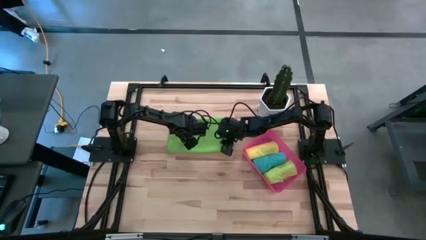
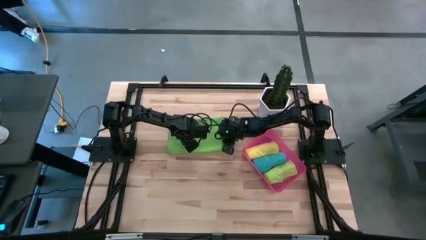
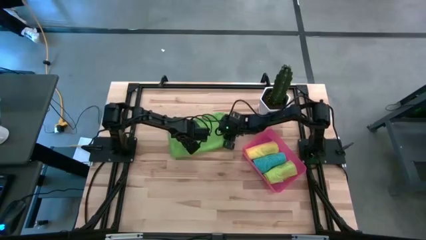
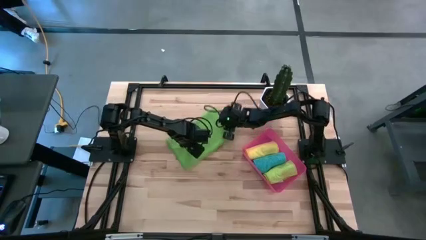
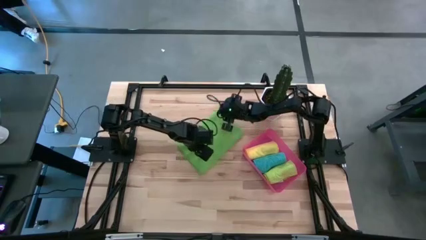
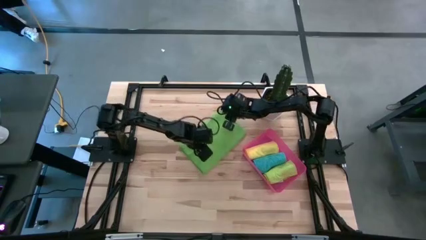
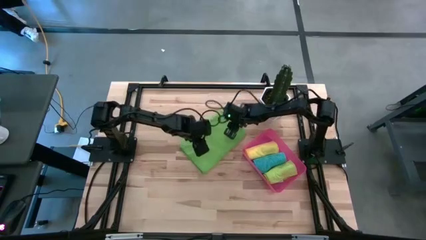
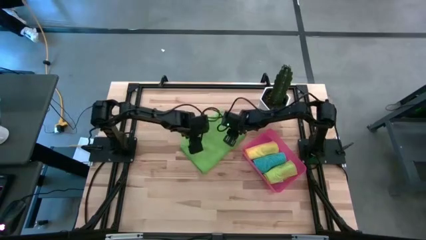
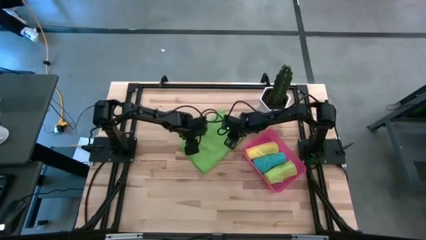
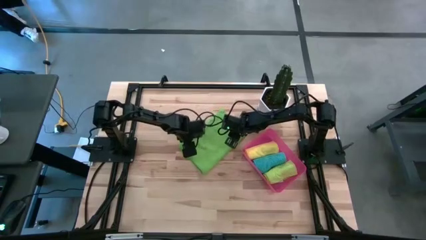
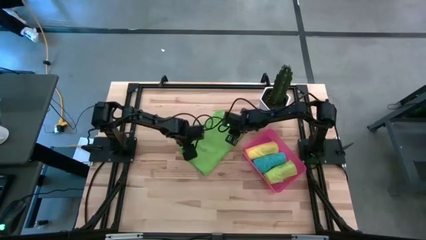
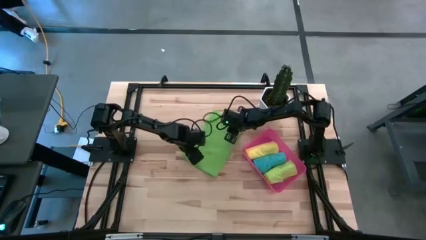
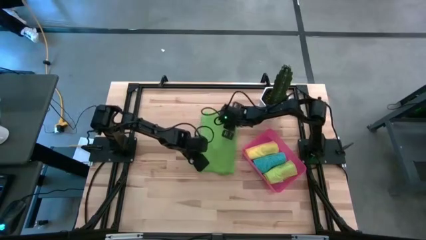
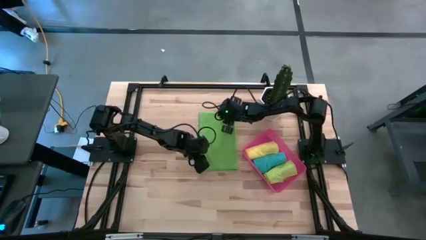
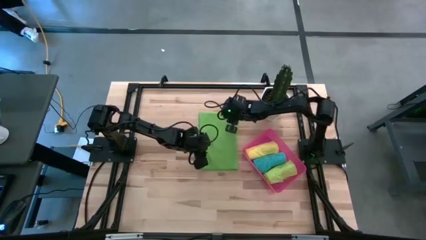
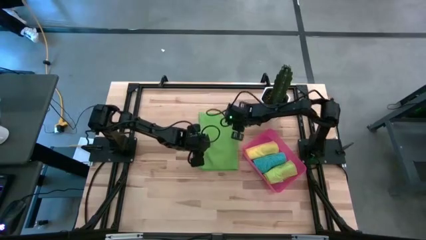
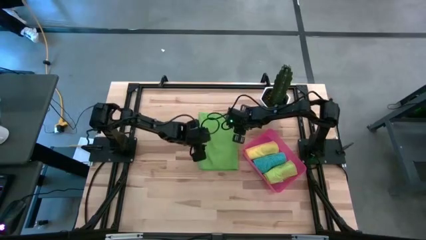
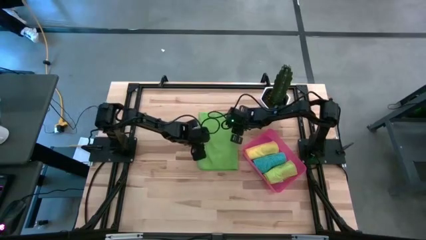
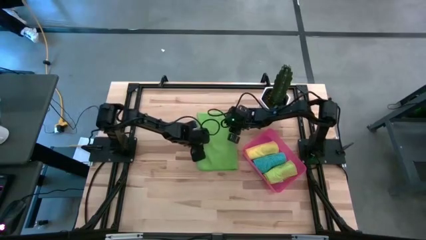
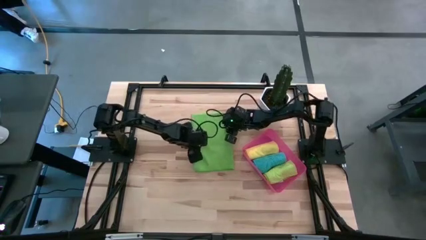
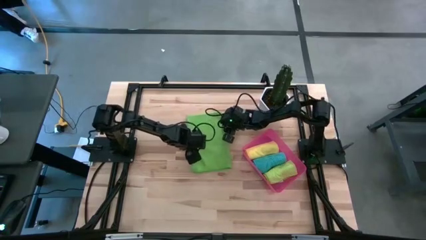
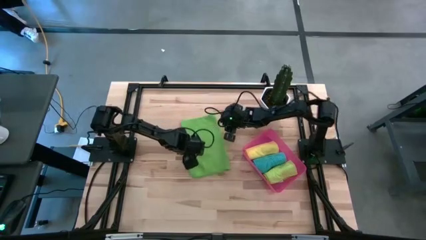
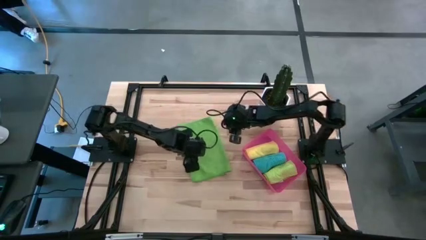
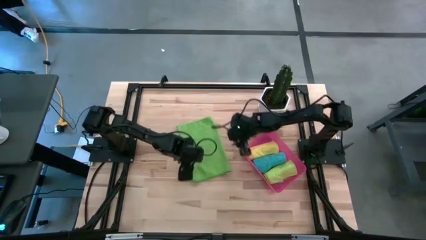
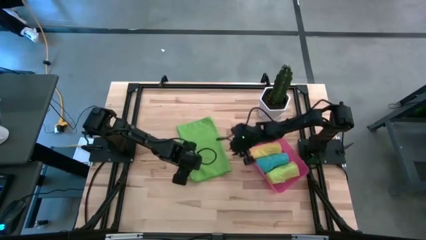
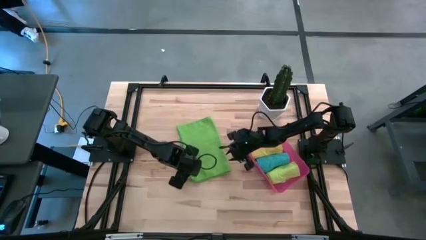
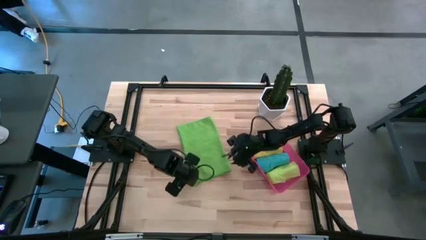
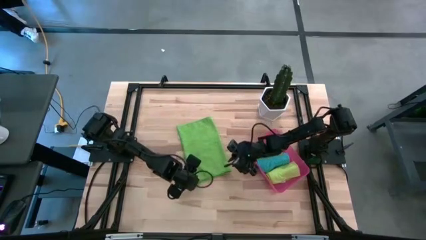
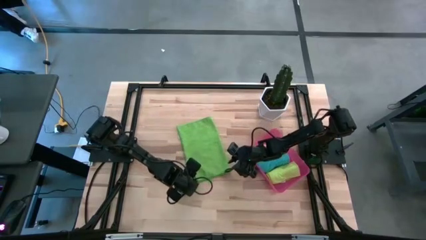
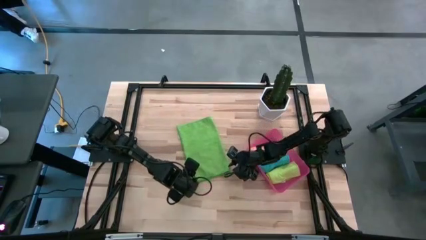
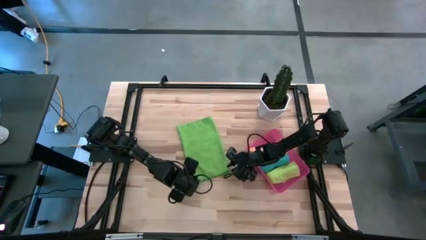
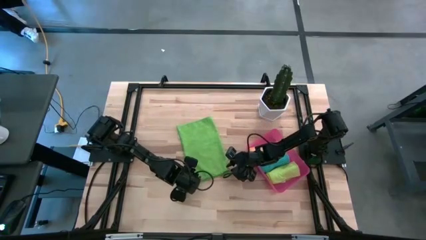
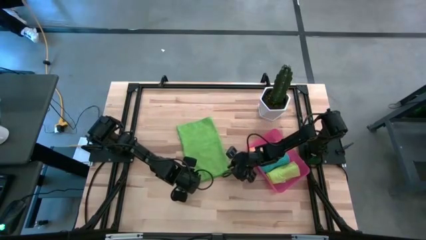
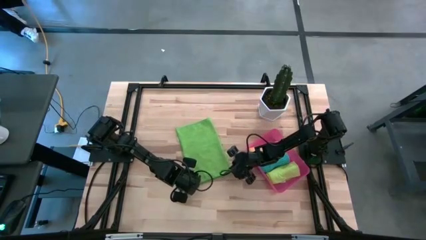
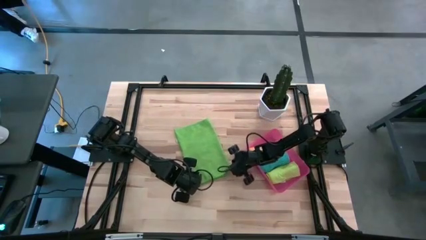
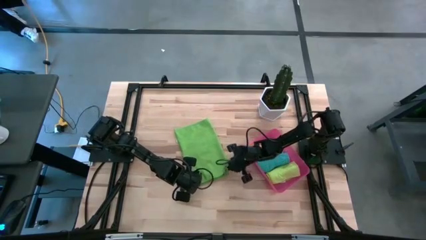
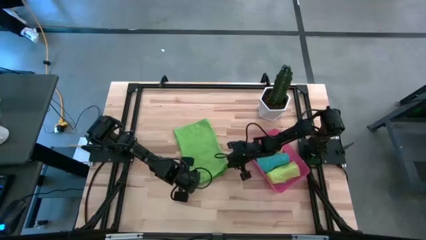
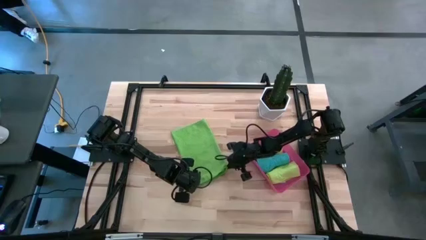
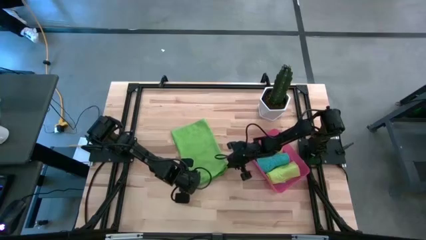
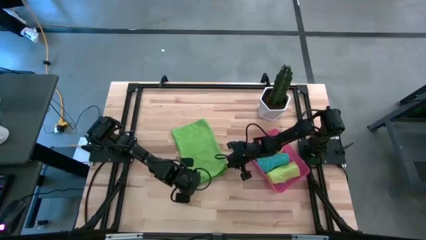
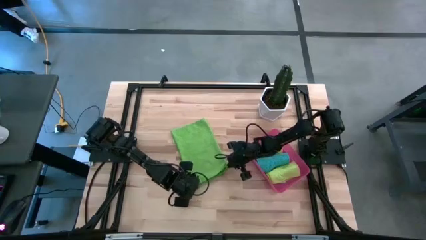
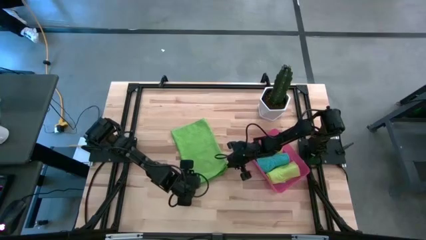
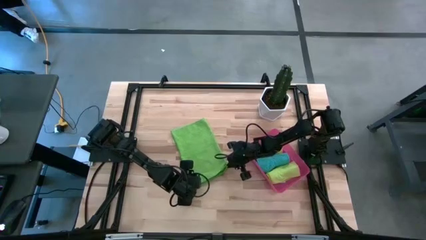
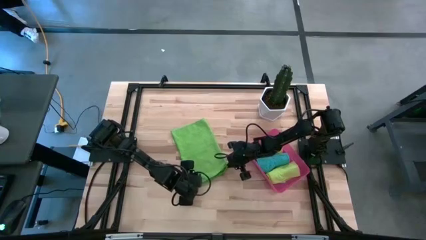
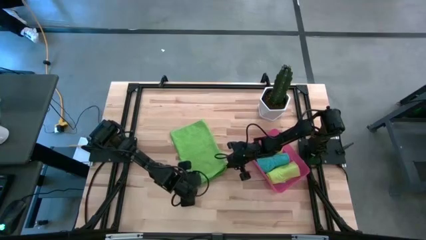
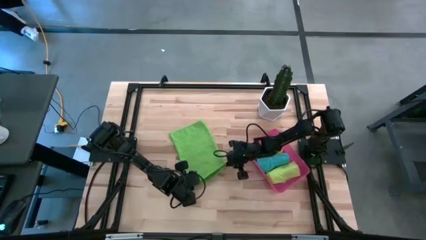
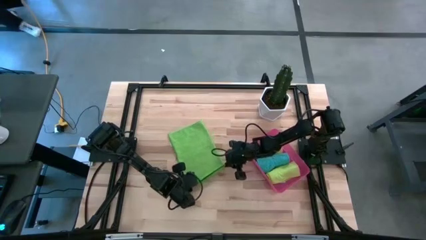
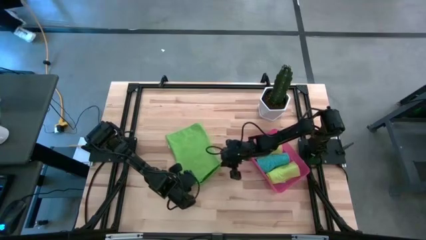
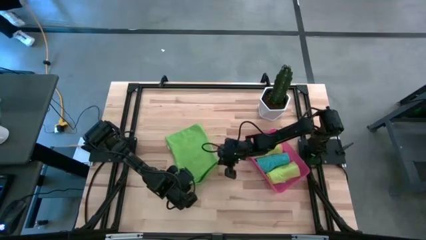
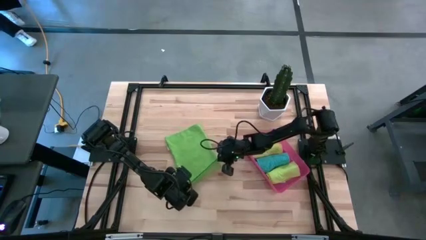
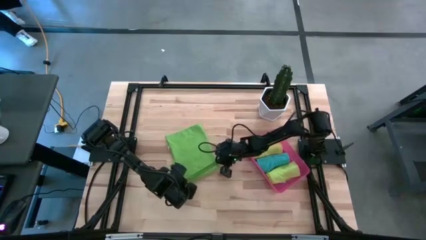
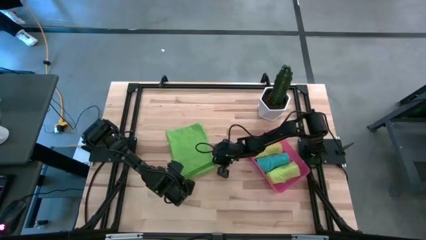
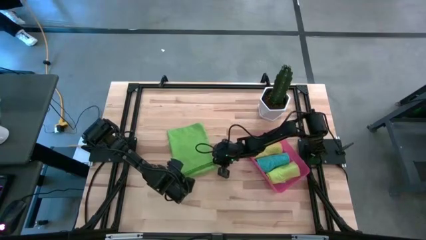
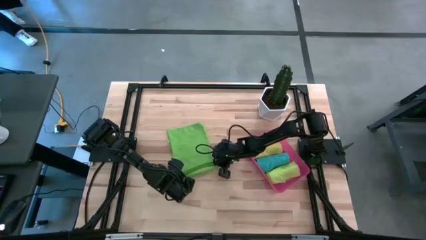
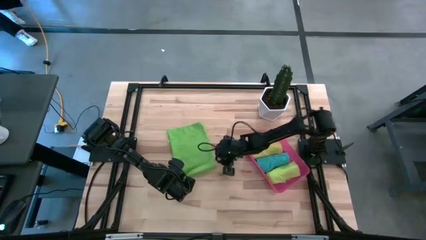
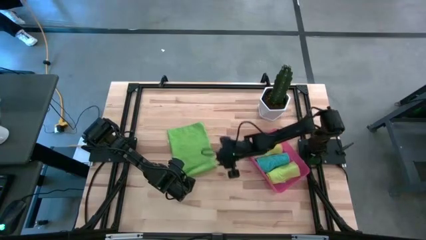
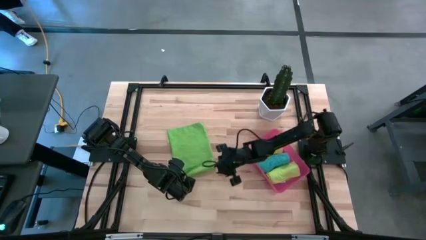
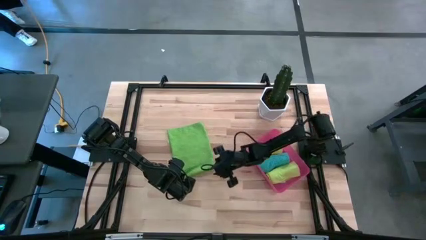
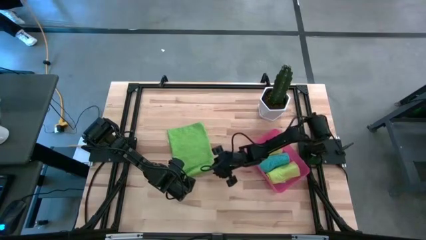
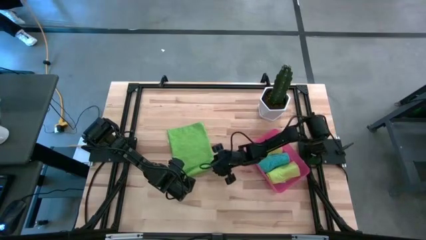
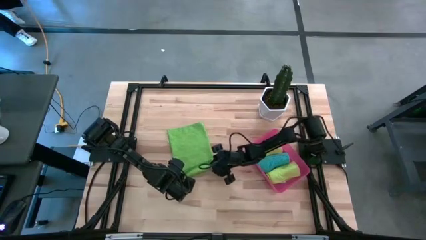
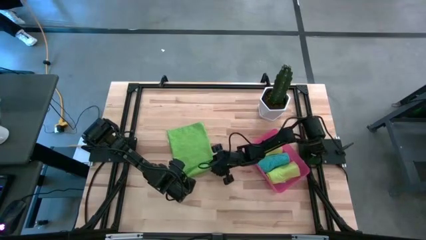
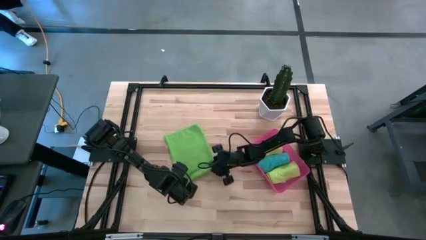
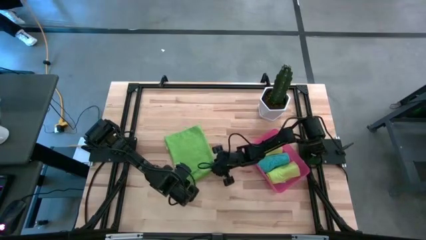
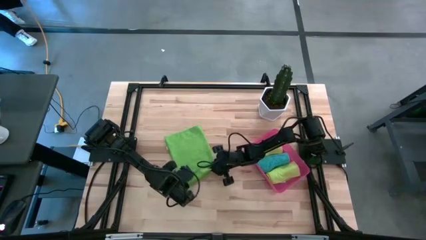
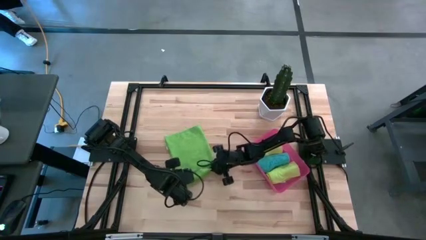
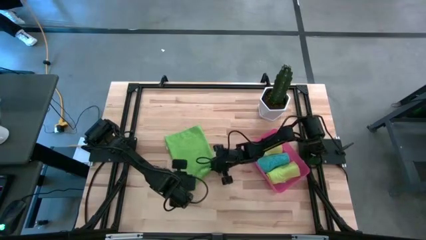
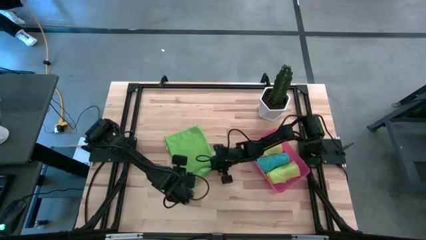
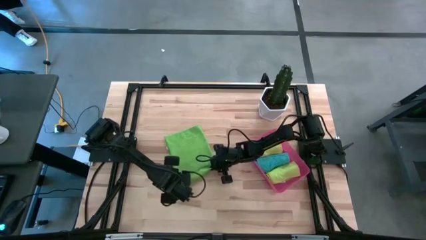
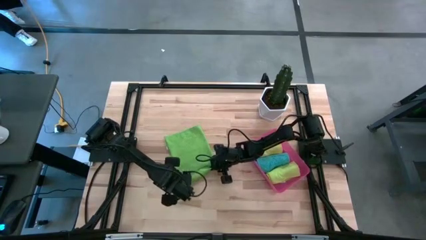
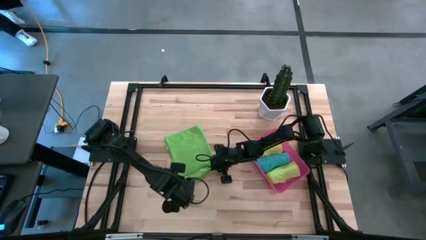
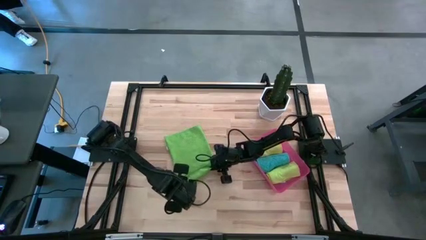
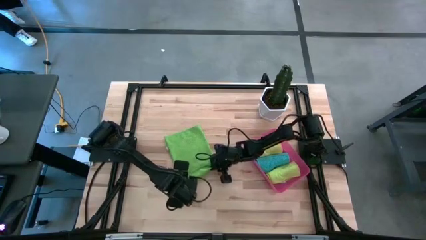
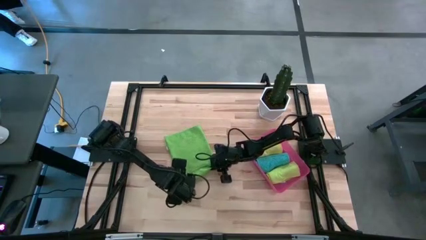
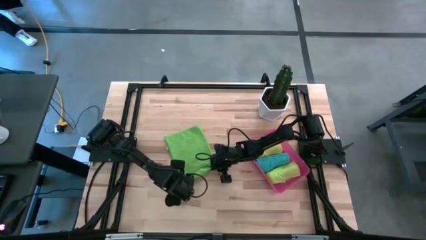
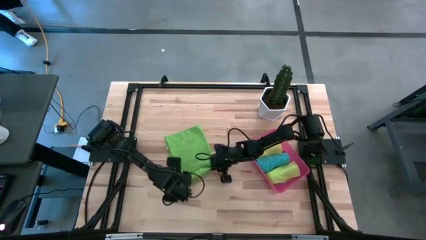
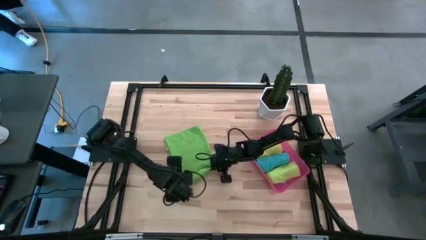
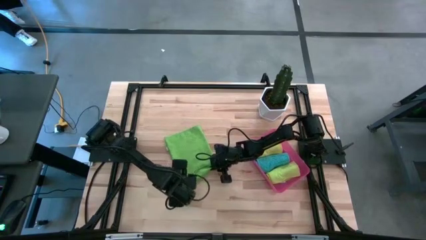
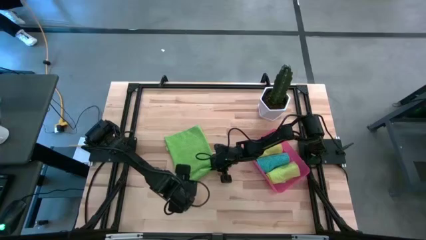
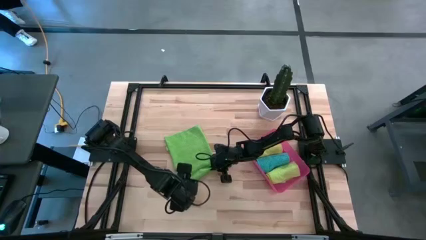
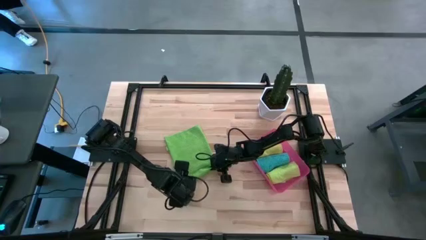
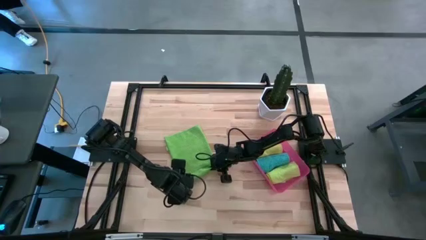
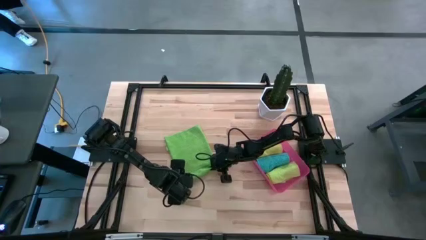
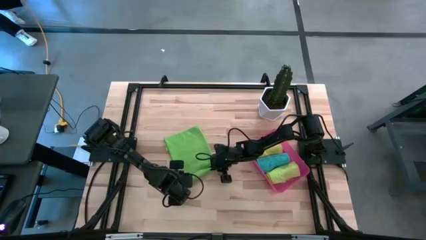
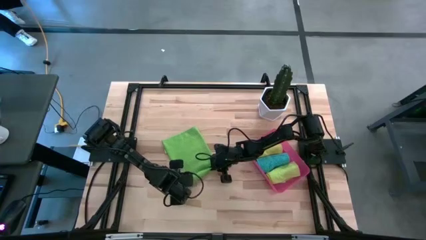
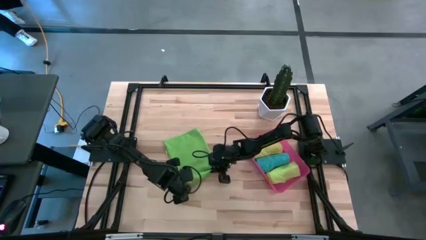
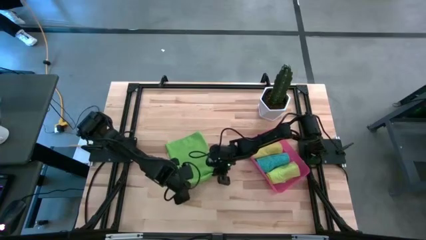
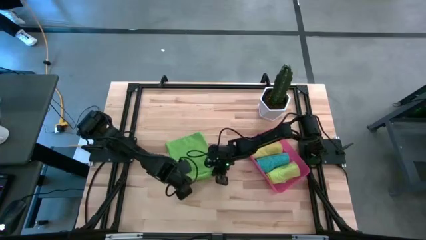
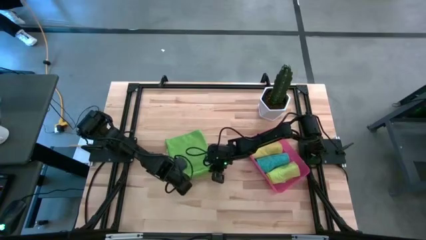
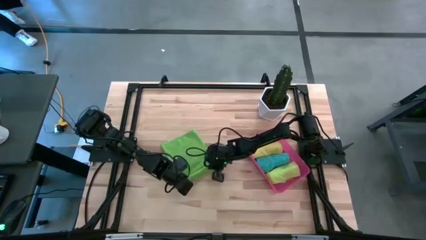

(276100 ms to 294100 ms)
Task: Roll microfiber towels into tight, uniform cylinder then place into a basket
Roll the green microfiber towel
